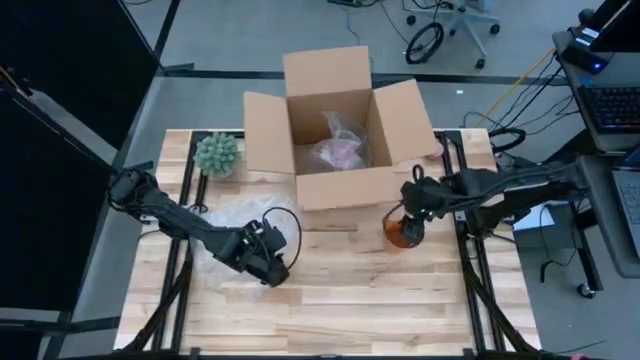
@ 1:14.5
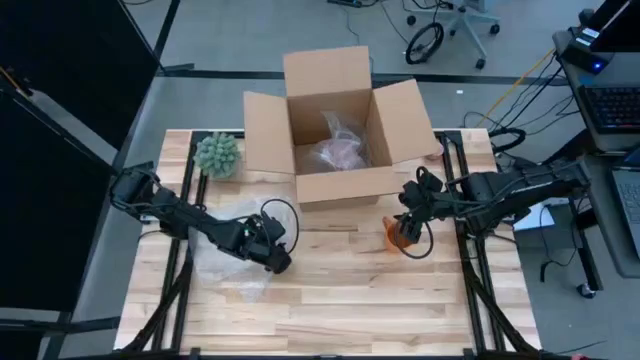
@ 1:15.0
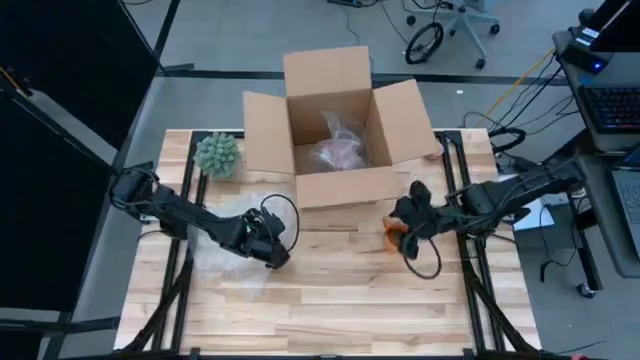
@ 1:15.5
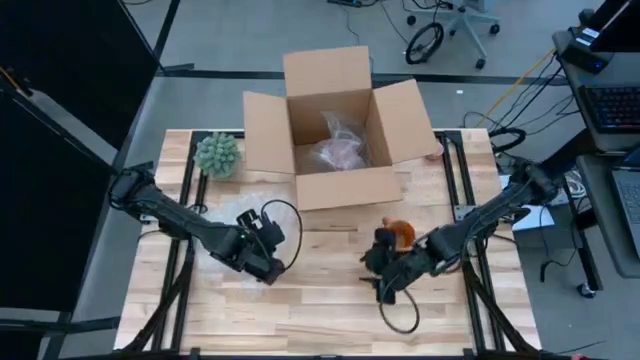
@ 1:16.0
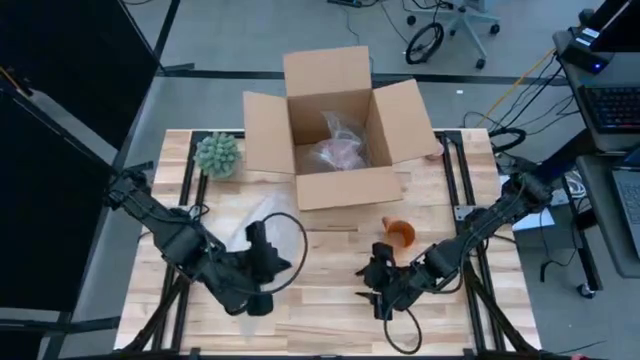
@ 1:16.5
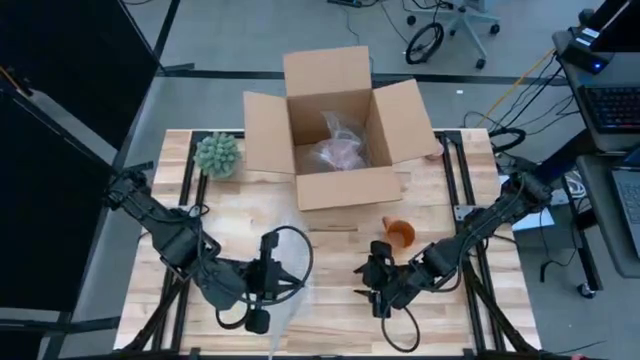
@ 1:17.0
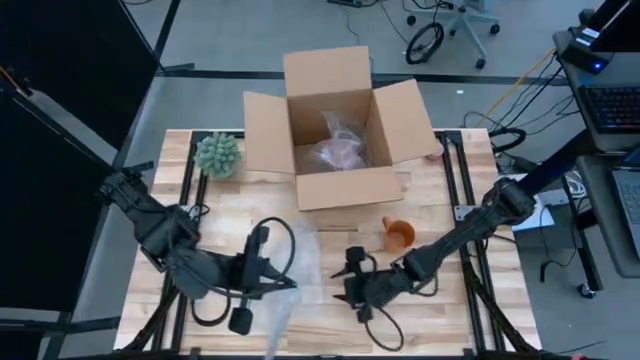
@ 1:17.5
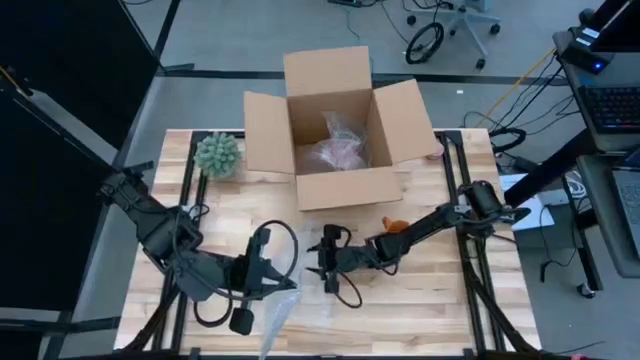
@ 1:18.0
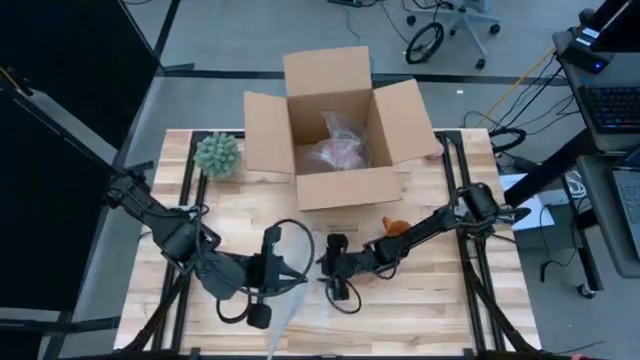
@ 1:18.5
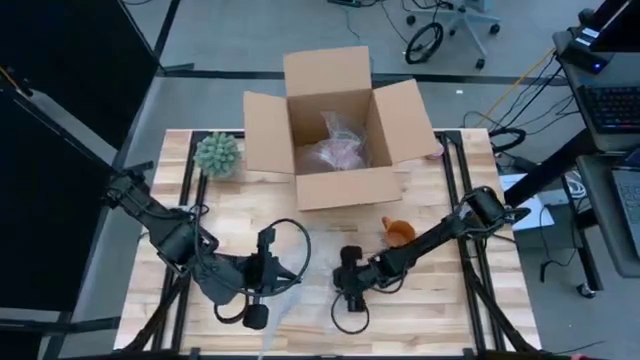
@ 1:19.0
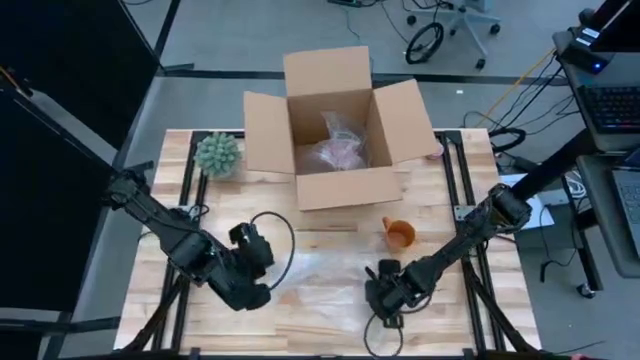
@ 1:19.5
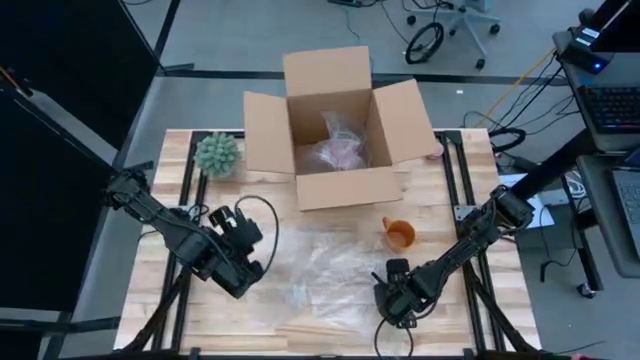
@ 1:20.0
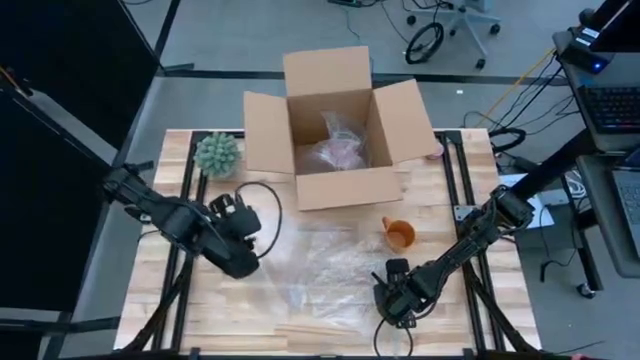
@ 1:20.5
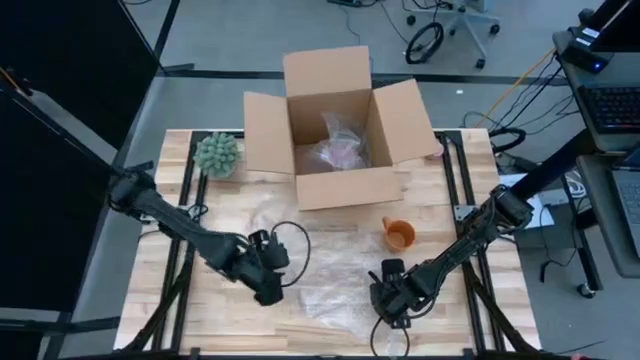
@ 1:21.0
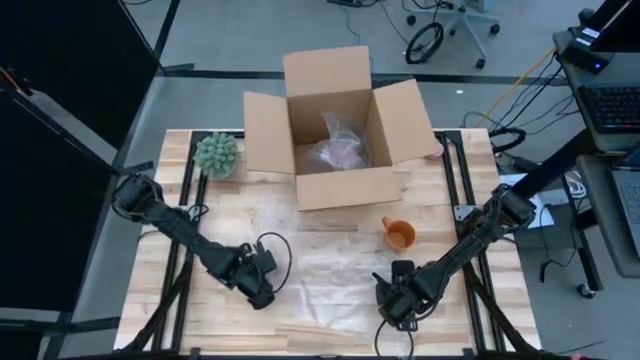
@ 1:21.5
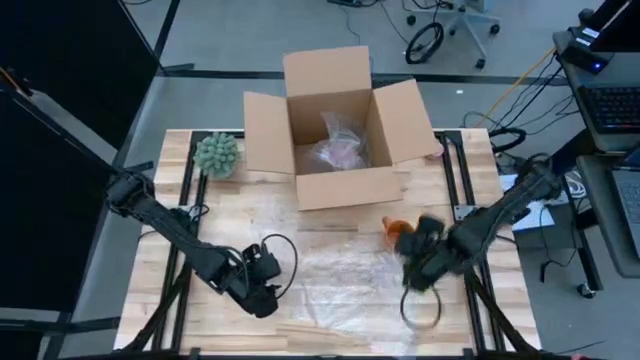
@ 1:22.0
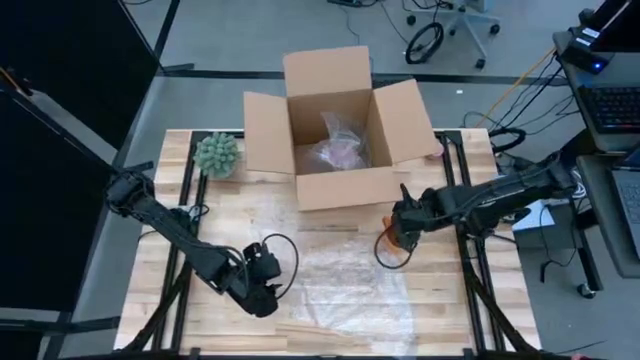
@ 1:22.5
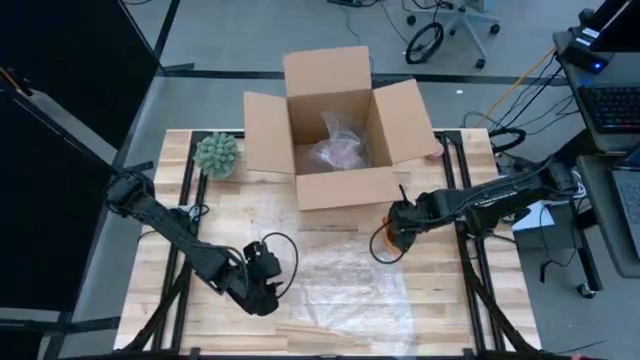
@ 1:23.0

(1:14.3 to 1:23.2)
Task: wrap mug
Prepare the left bubble wrap

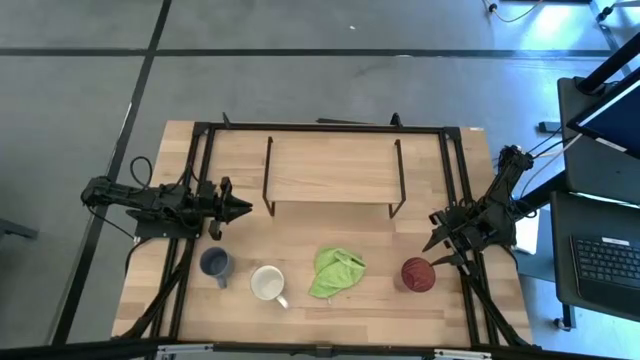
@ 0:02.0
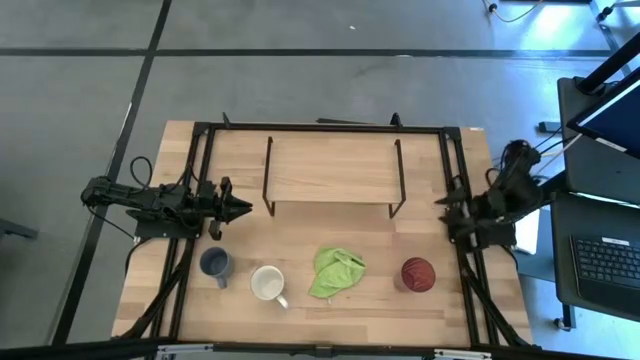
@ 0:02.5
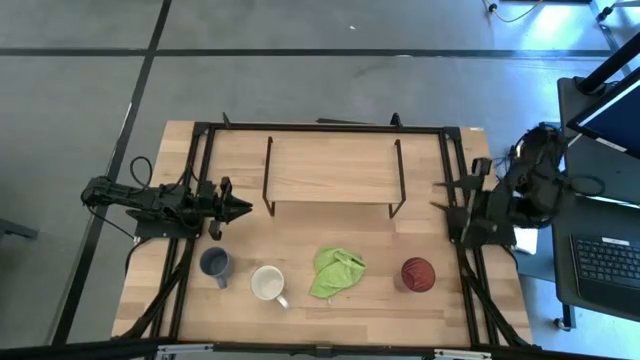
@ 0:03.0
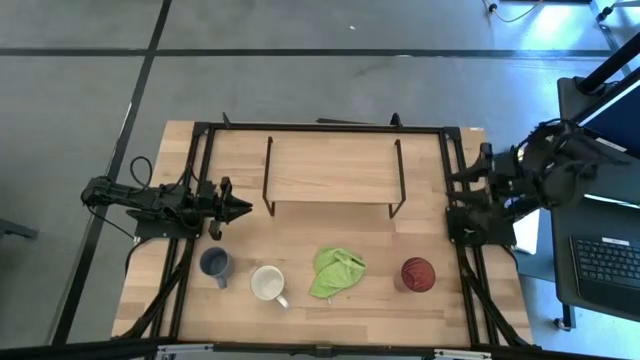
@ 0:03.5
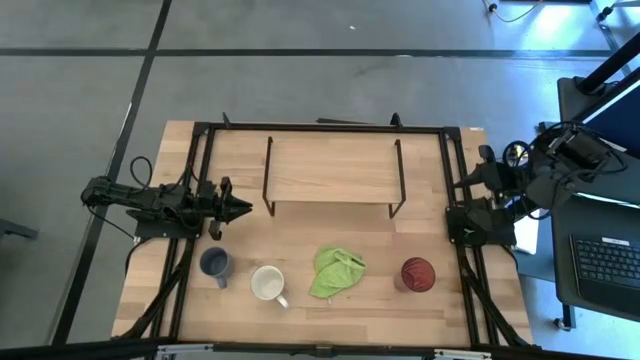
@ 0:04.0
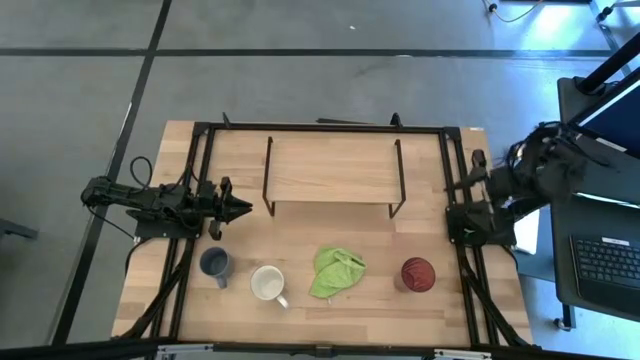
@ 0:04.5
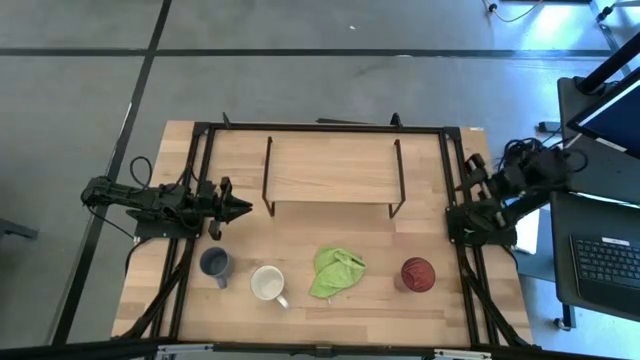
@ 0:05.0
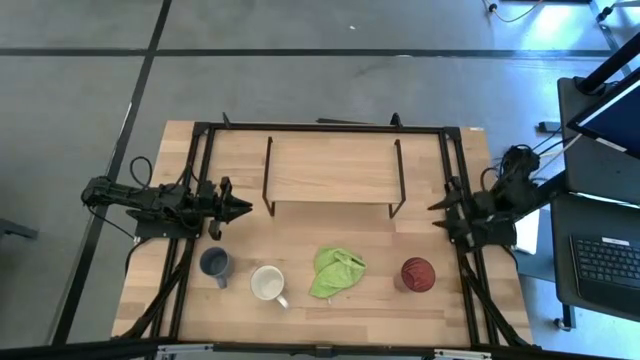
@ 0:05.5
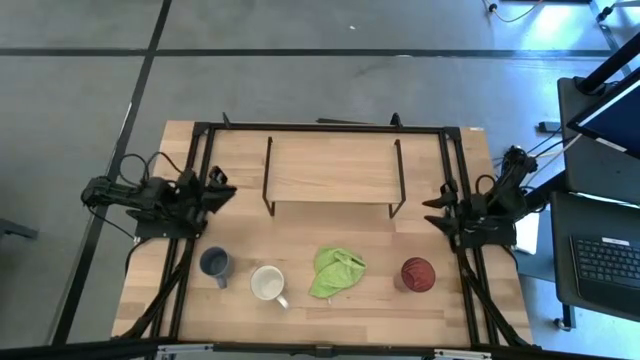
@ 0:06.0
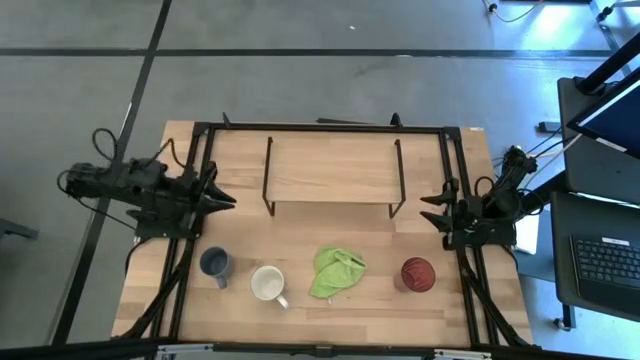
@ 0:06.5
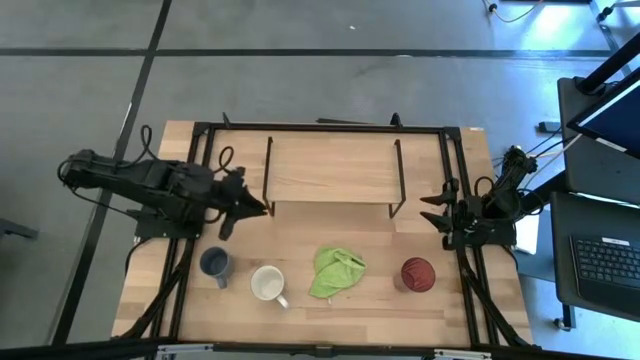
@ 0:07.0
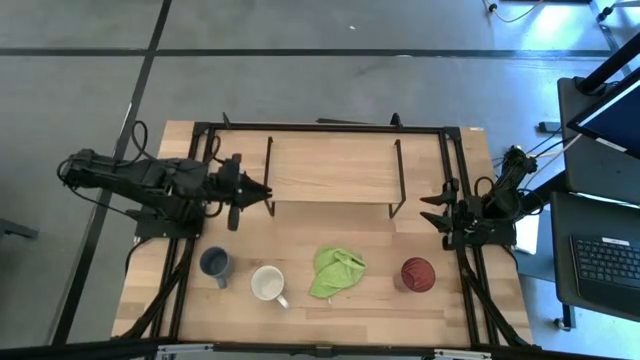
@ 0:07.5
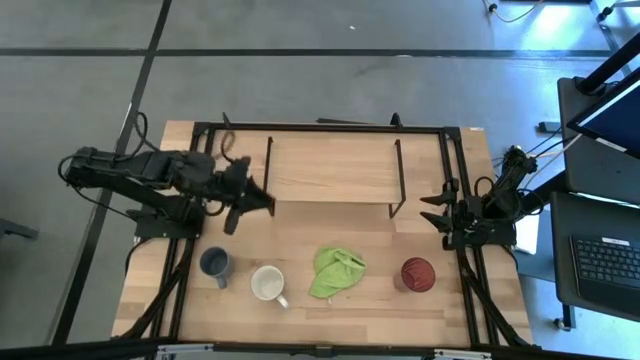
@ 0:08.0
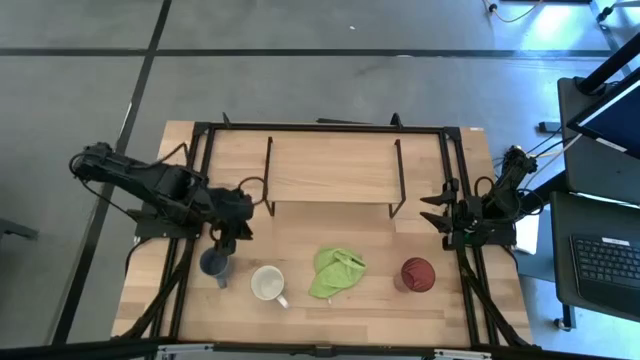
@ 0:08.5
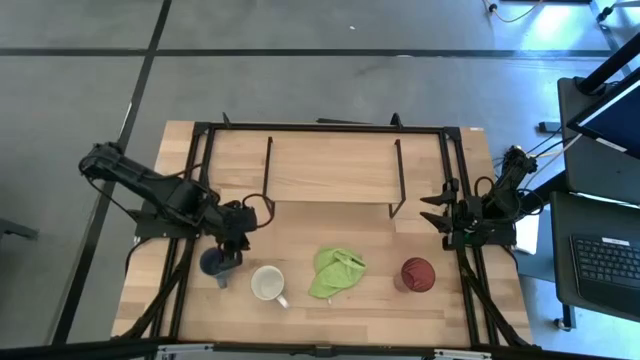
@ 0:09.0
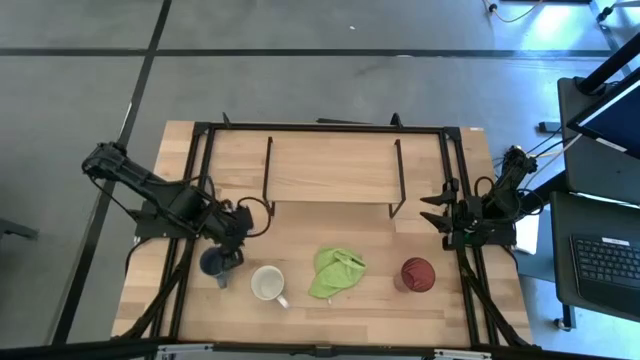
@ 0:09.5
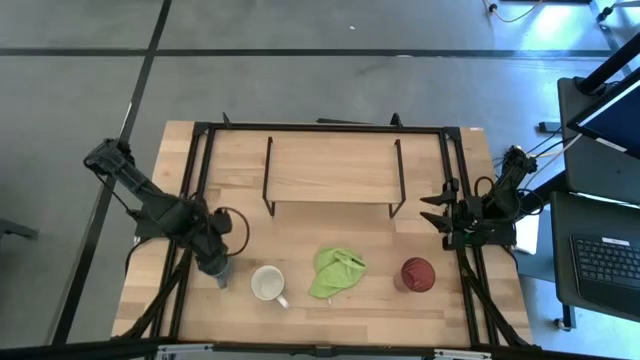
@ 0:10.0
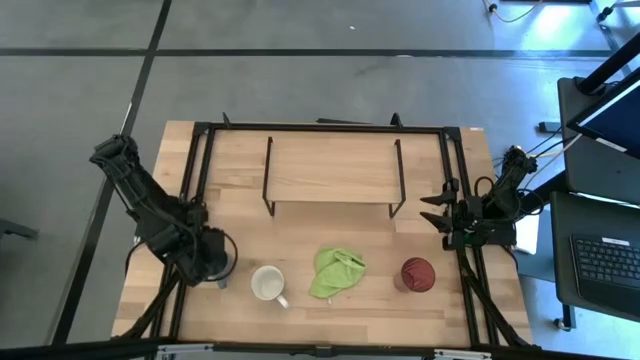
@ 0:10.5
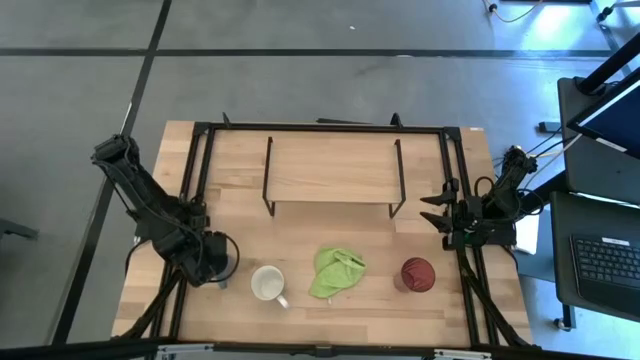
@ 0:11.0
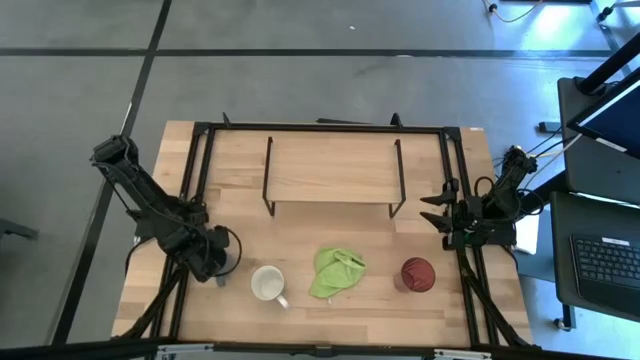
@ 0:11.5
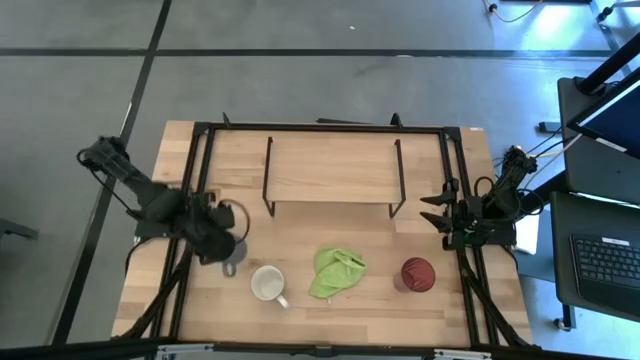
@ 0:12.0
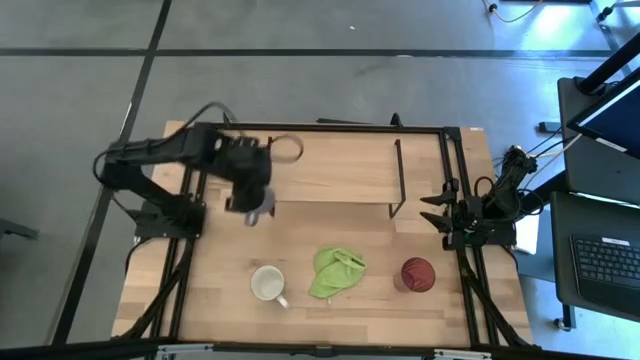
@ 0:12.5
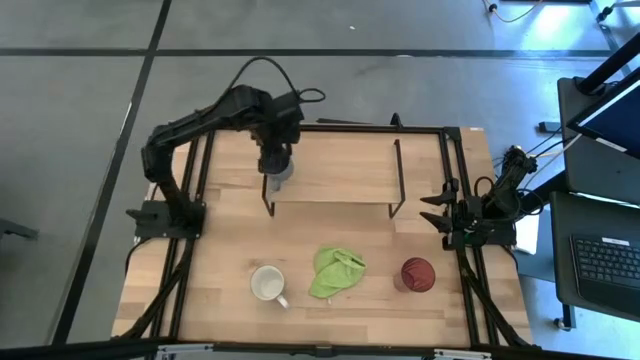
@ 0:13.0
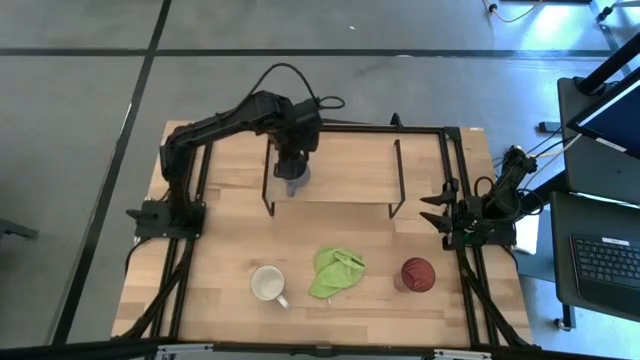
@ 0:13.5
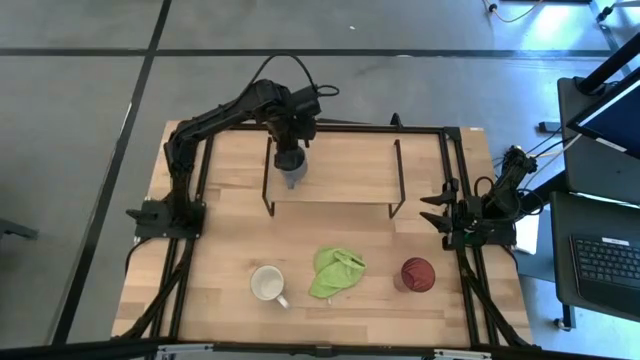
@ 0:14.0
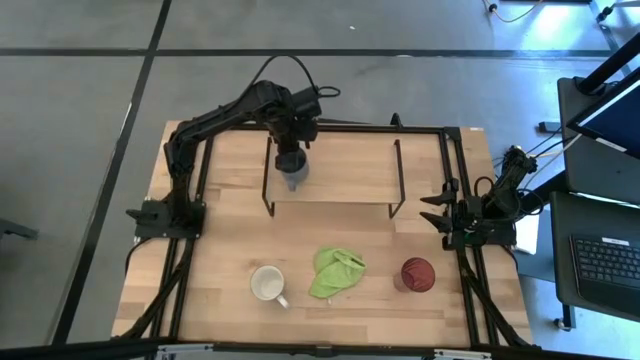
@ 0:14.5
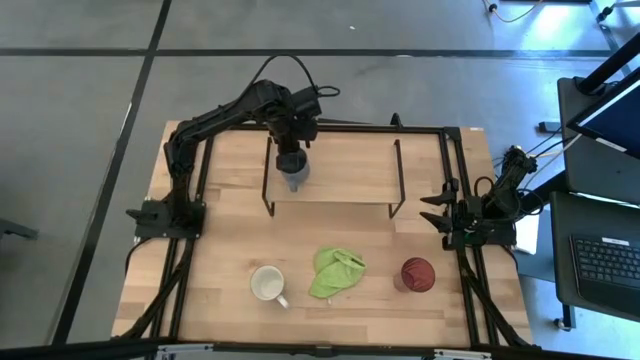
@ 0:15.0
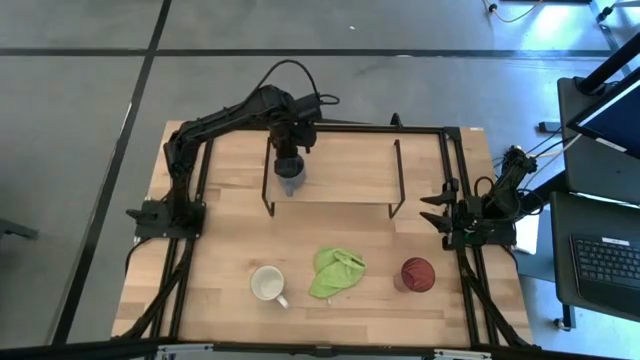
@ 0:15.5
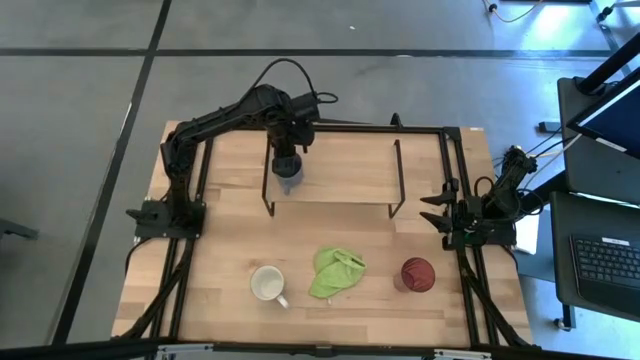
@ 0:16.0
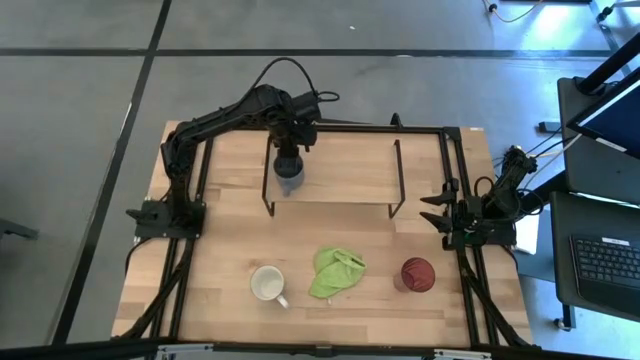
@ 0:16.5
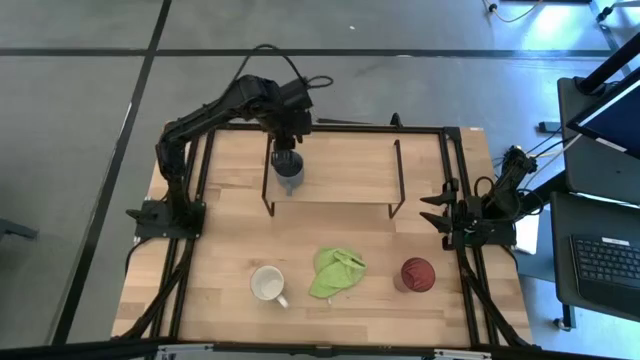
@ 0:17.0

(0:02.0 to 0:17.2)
Task: Stack small to large cups/mugs on shelf
Put the blue mug on the shelf
